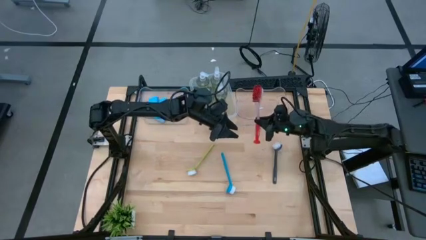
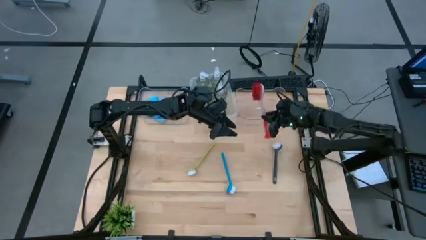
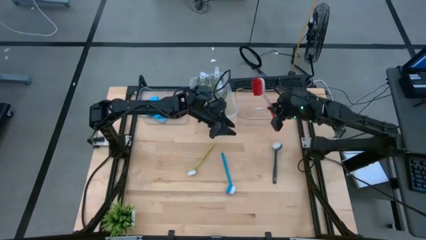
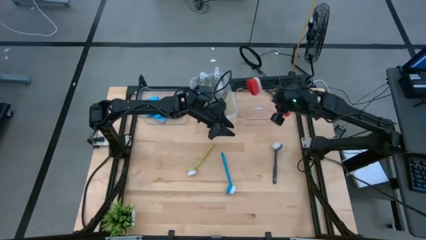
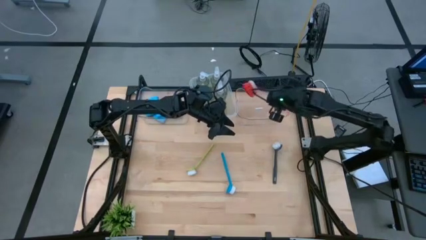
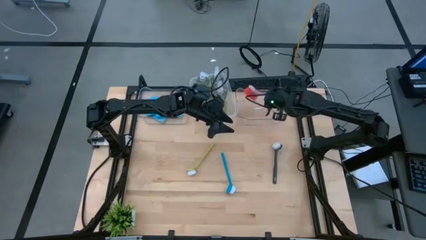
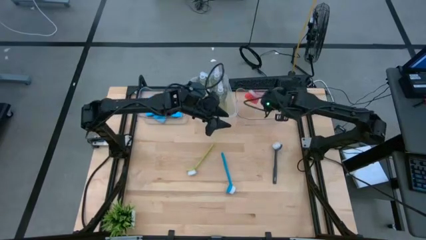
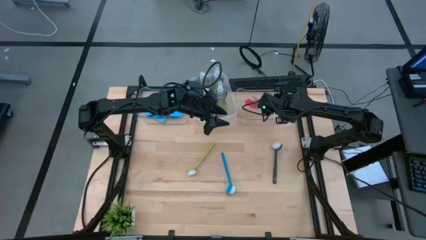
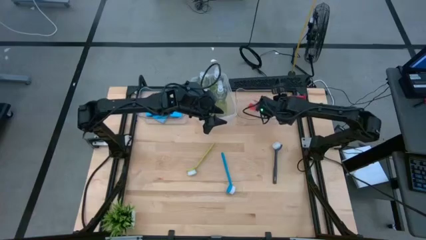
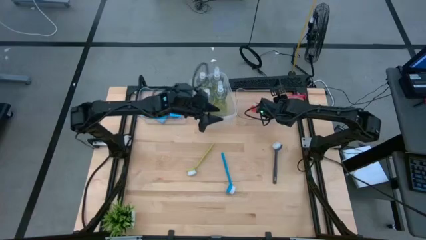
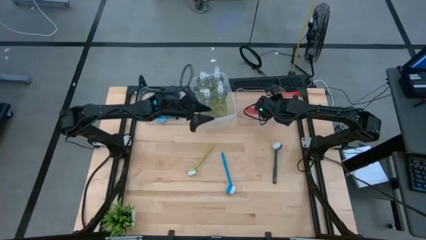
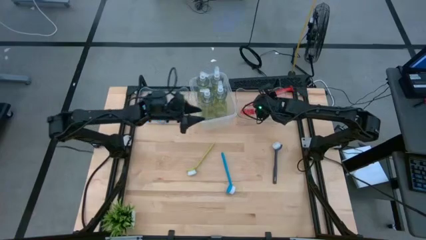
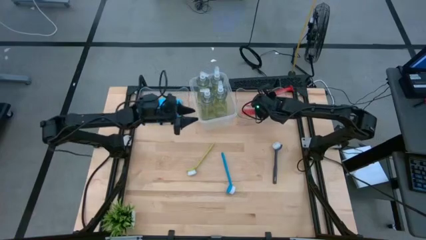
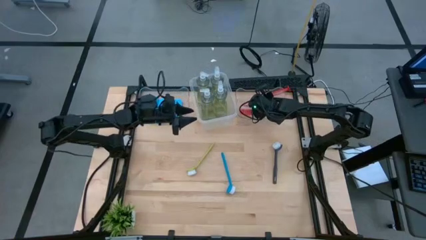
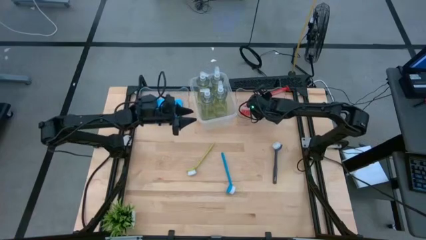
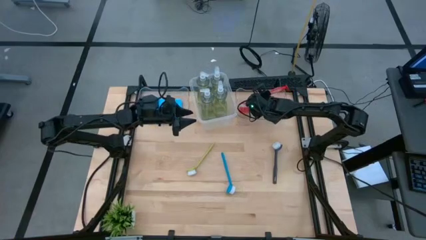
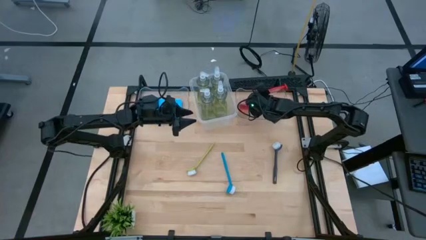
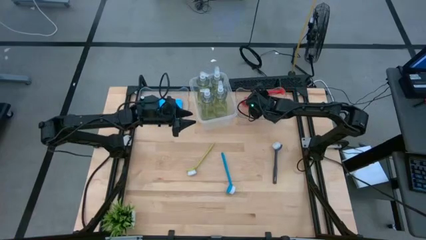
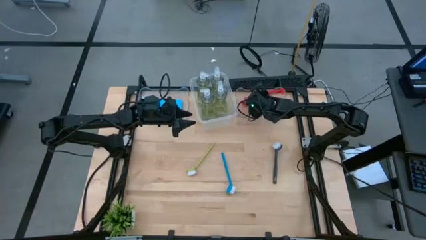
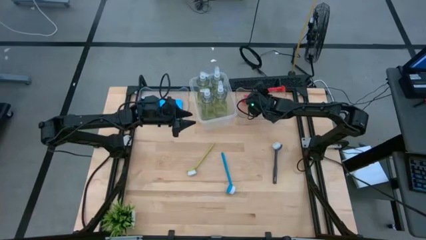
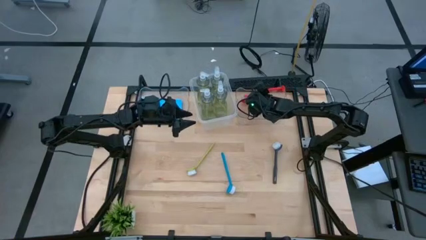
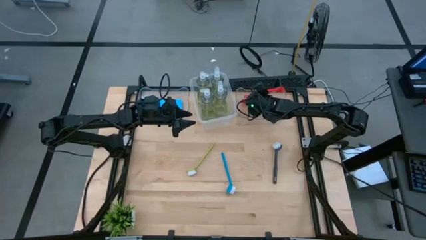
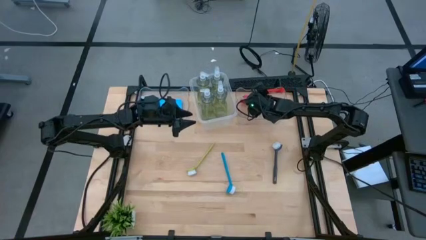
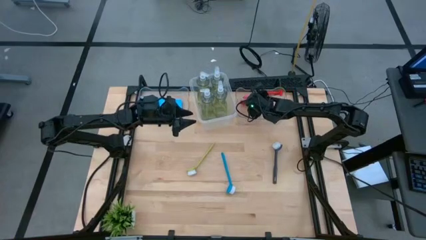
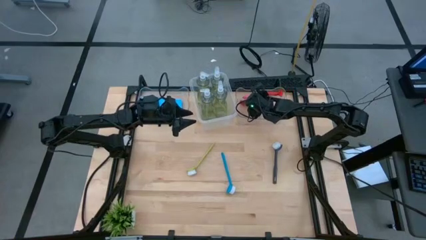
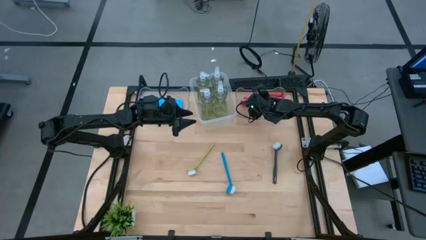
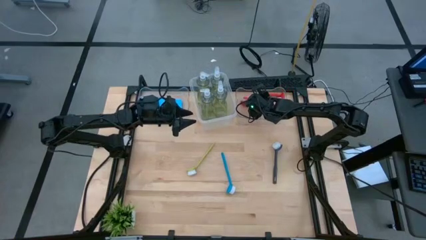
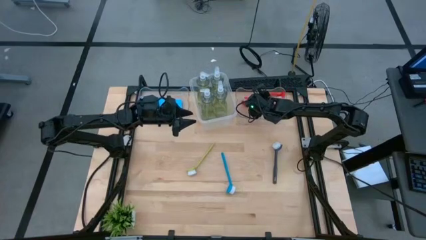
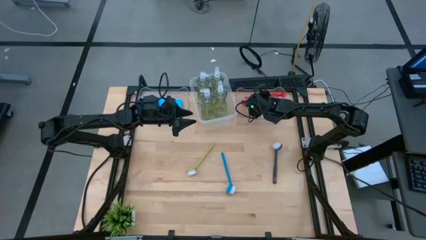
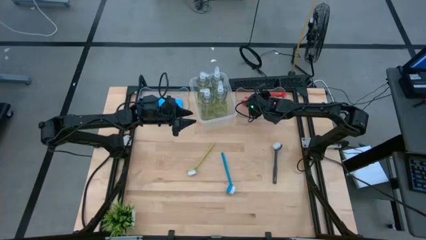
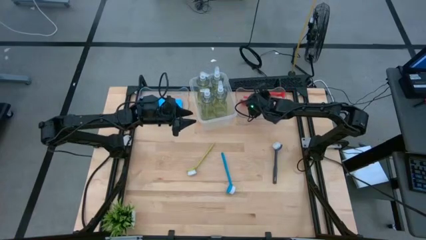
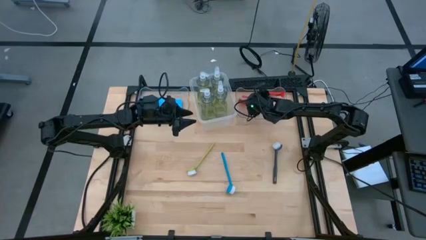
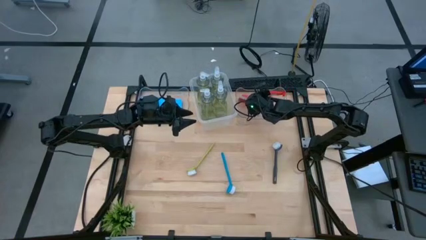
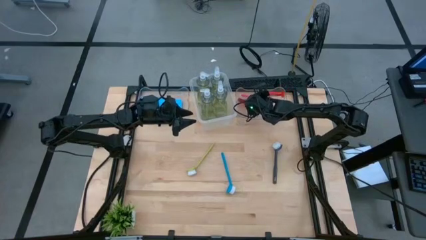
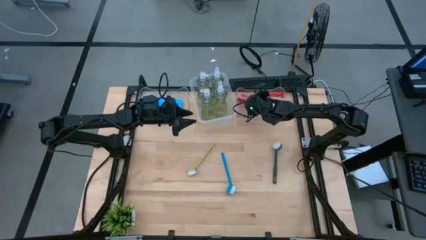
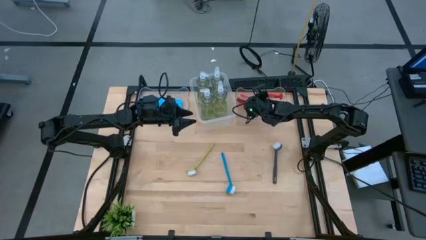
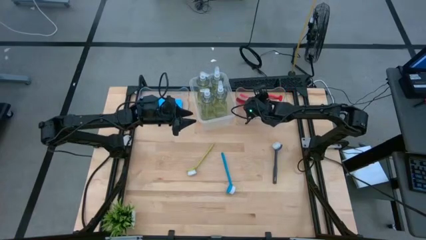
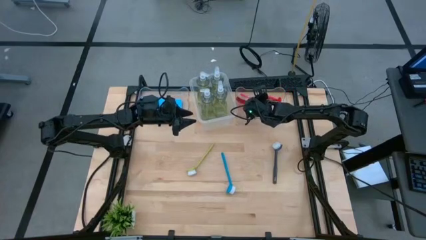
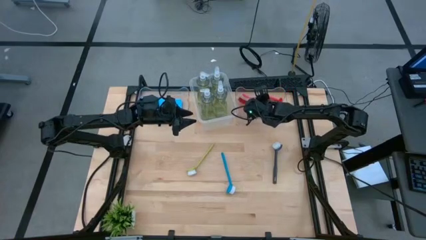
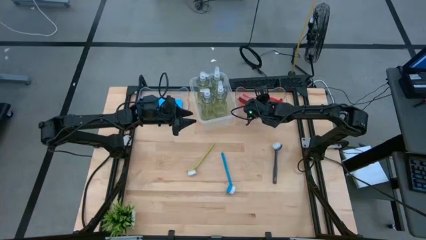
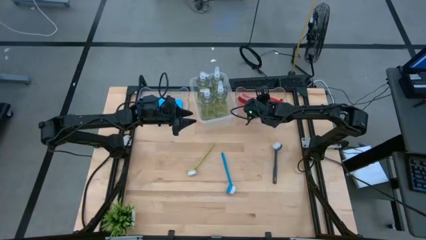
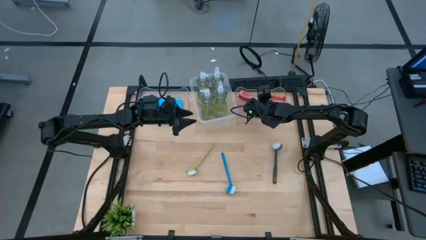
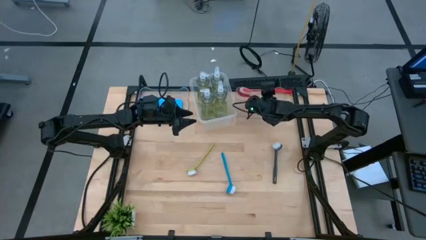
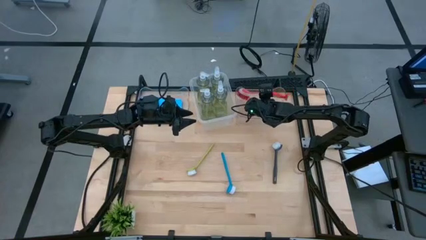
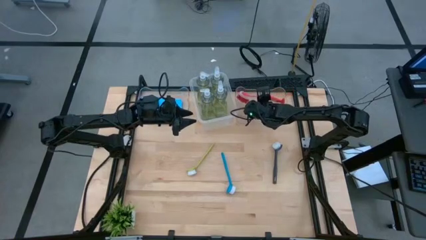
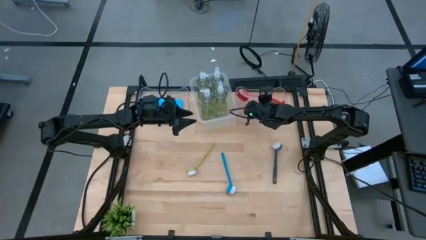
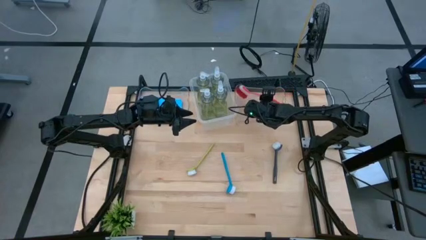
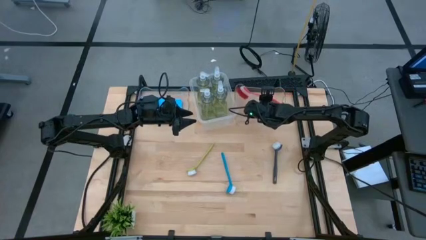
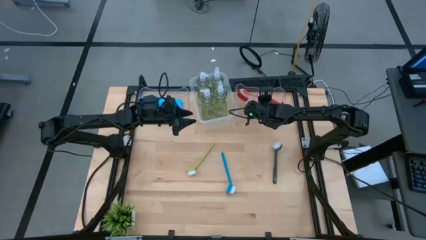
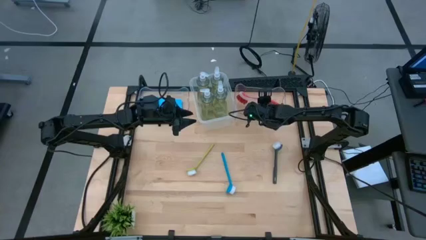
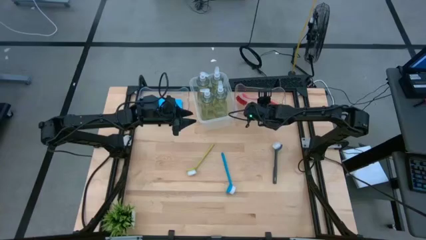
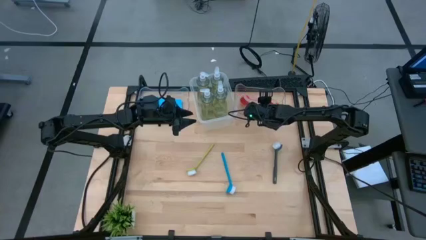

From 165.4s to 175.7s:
Task: Pick & Place Kitchen Sink Supplies
Put the red dish brush into the right transparent bin

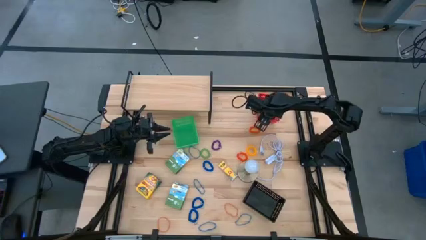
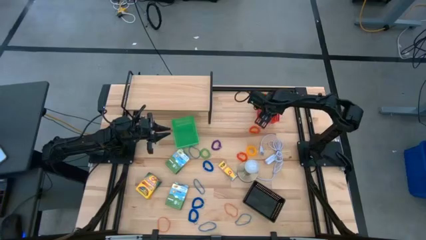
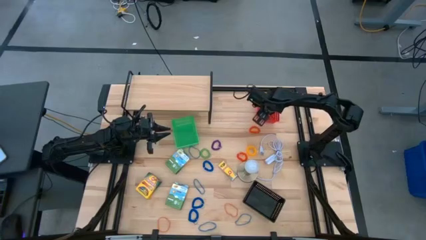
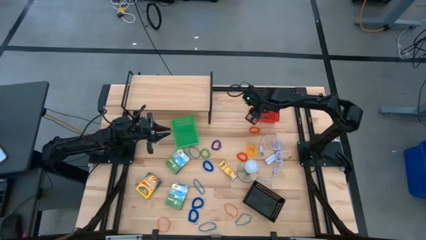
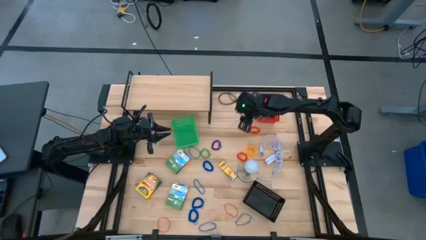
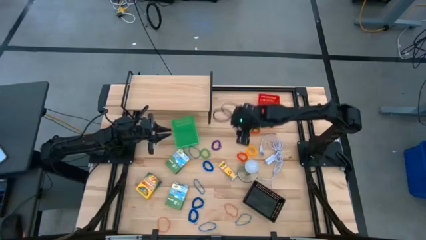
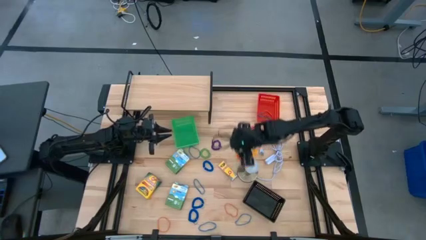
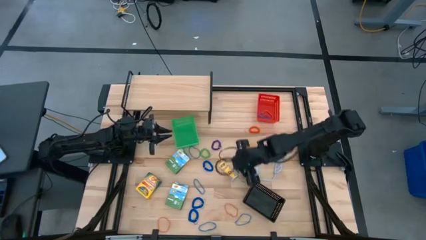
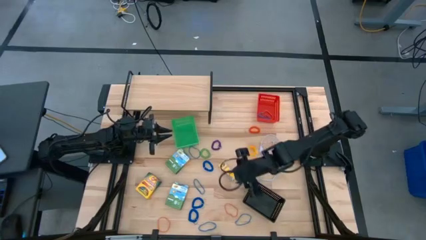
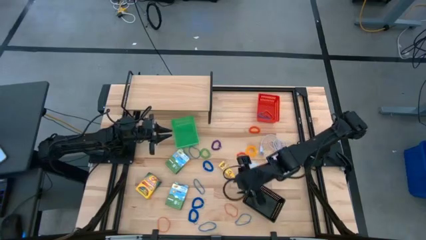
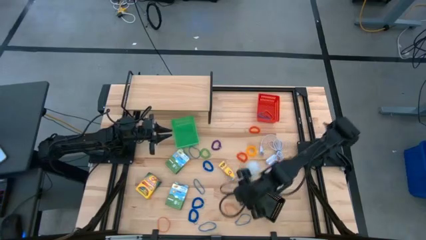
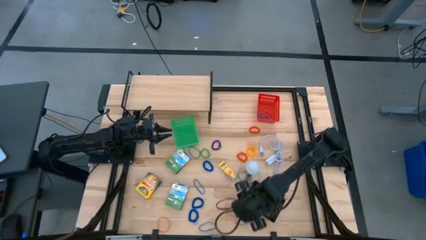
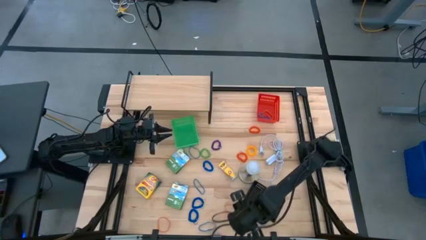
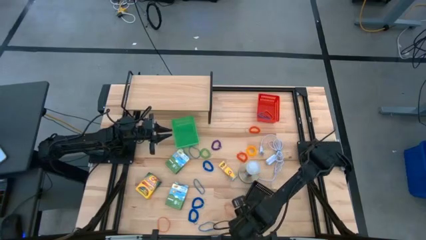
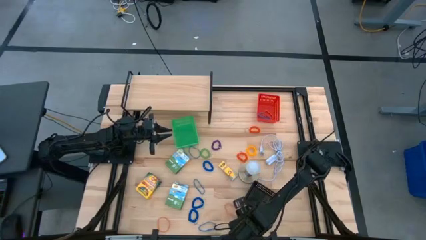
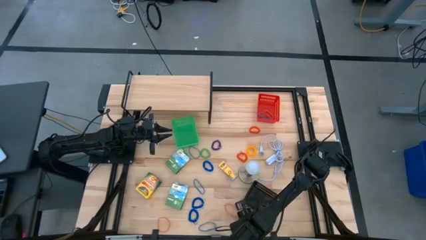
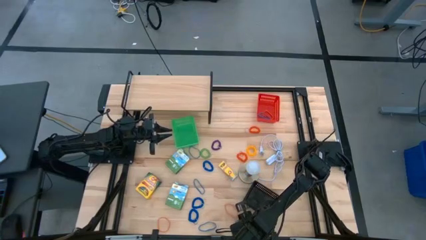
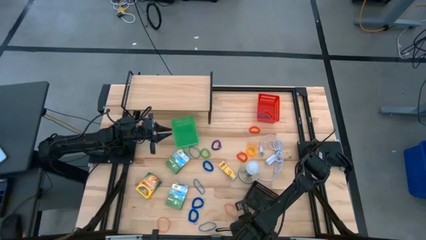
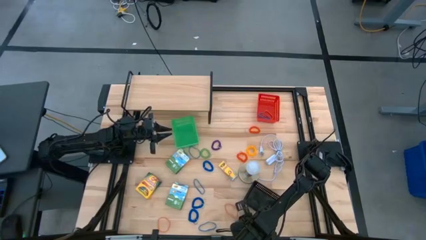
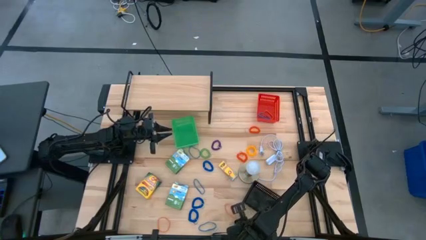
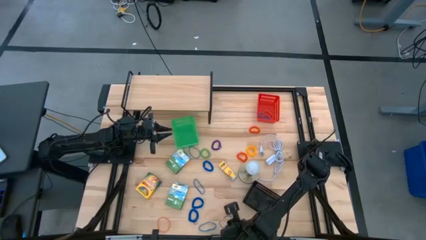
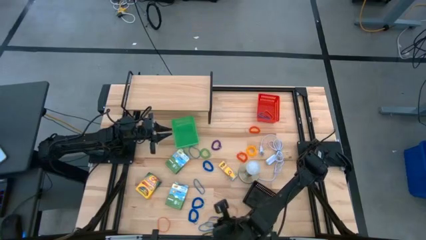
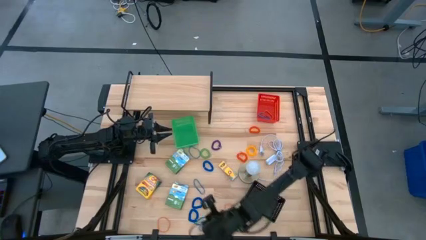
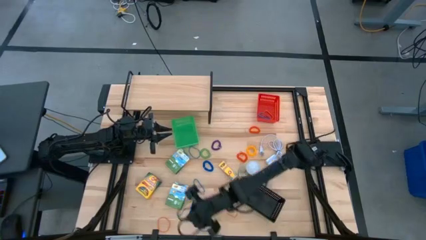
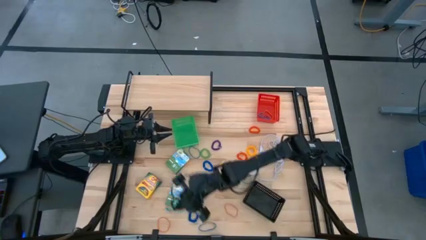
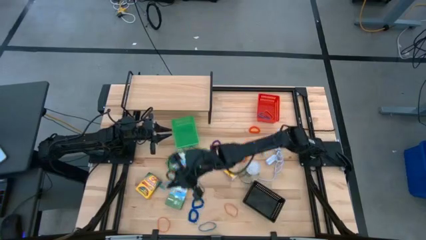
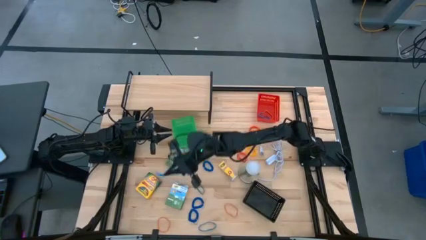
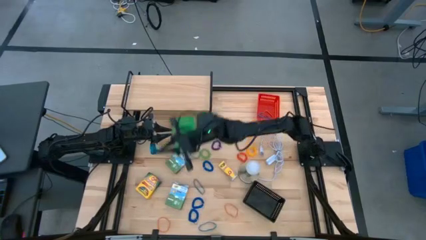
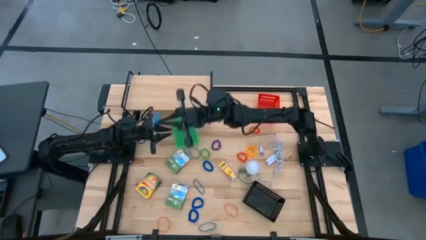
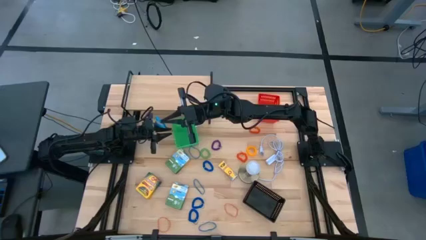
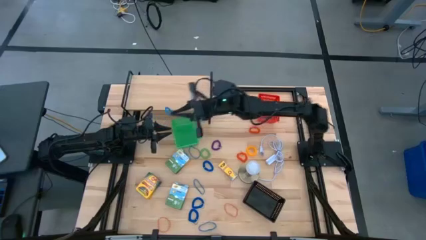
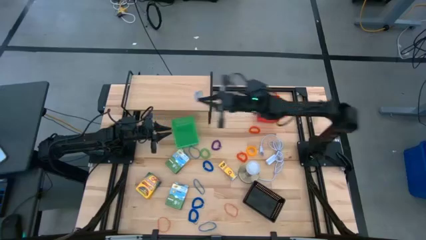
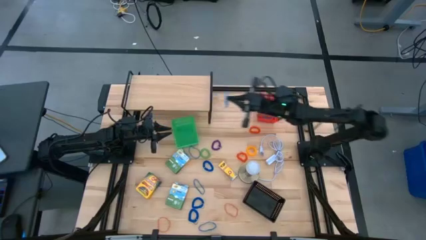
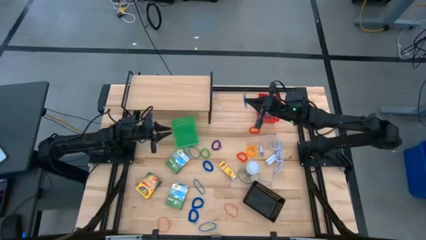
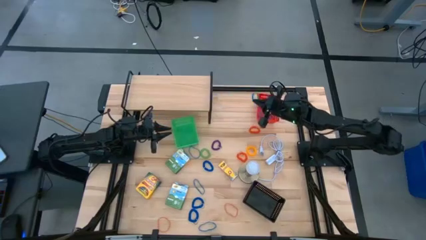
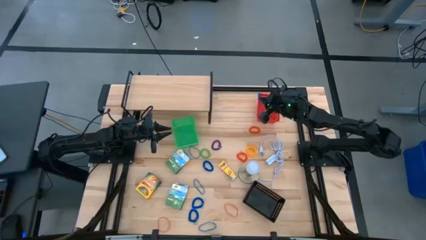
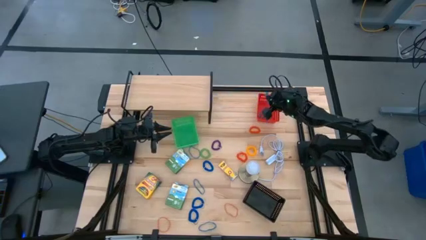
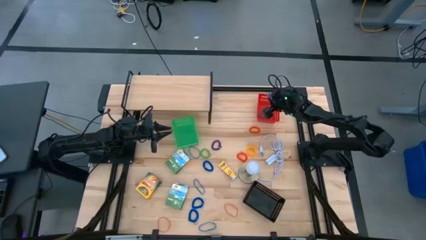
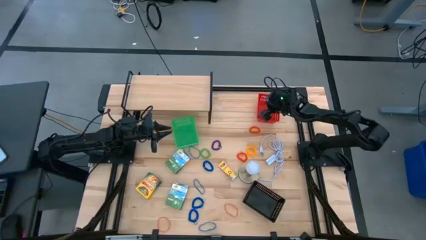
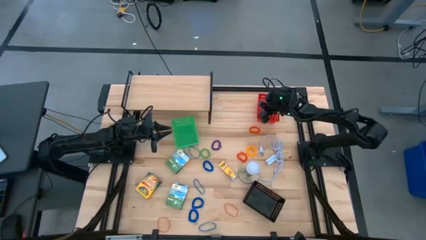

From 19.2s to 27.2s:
Task: Pick & Place Office Desk Supplies
Put the blue rubber band into the red basket
